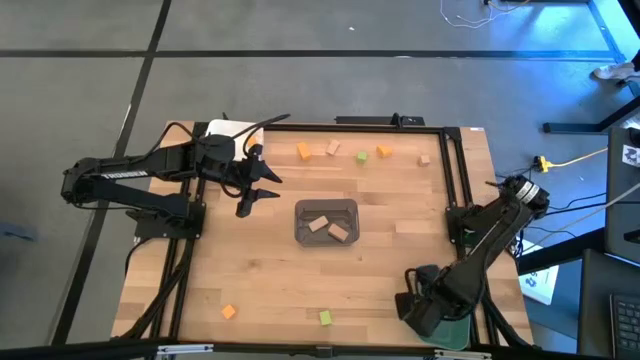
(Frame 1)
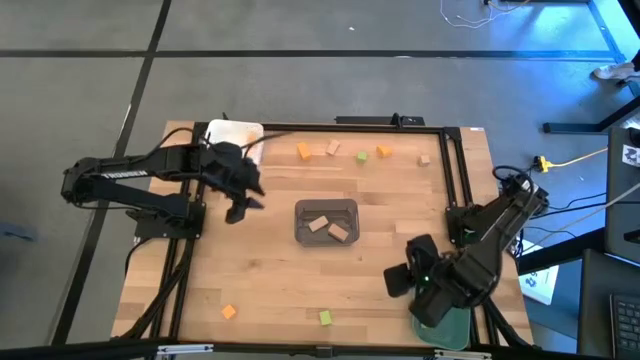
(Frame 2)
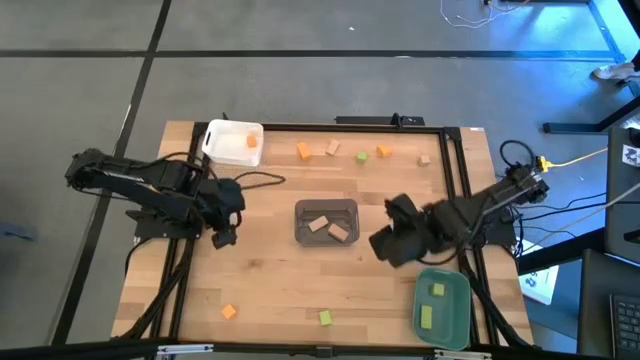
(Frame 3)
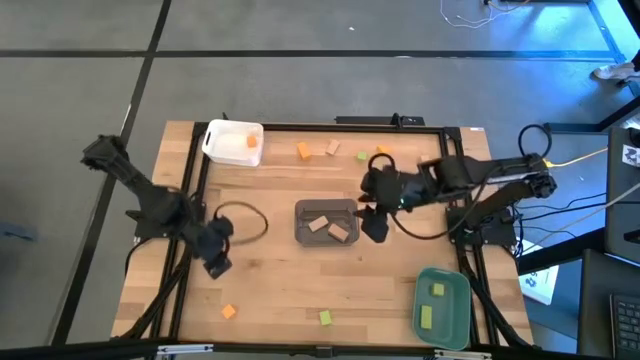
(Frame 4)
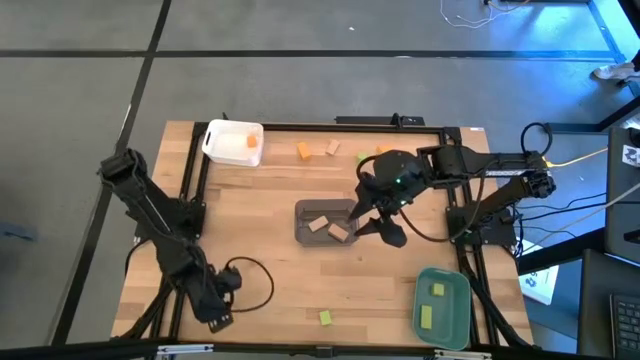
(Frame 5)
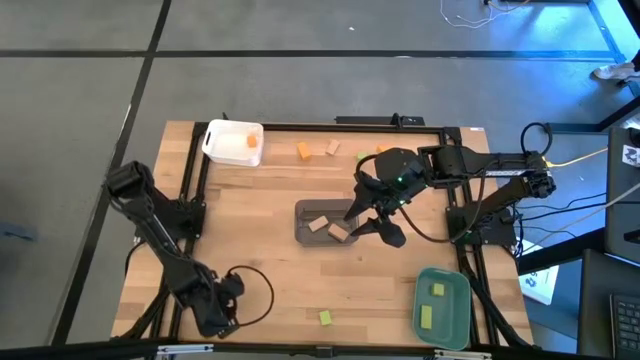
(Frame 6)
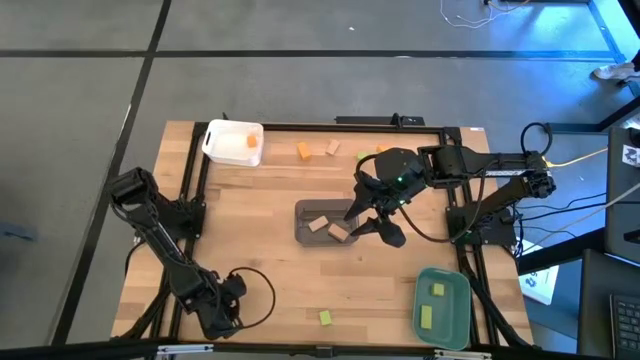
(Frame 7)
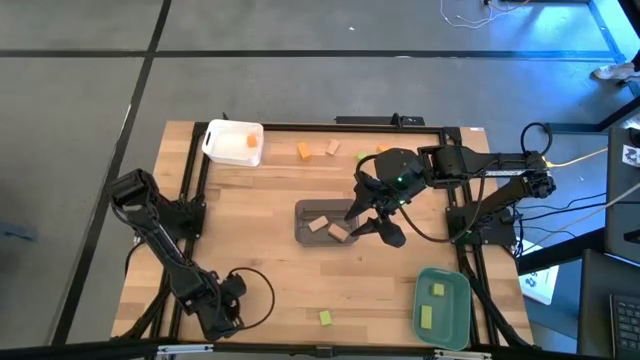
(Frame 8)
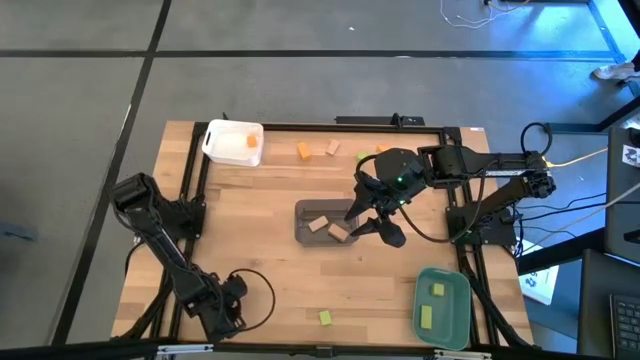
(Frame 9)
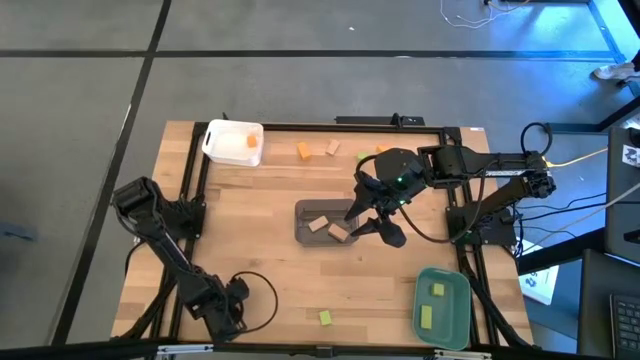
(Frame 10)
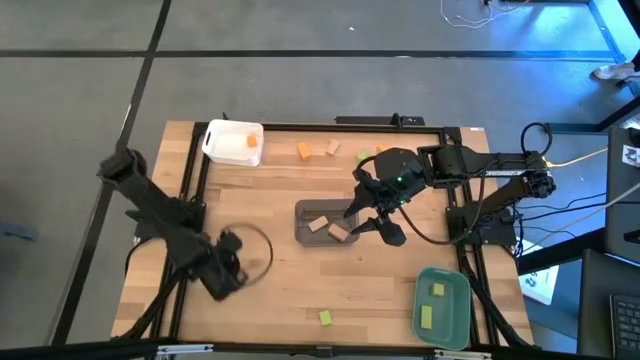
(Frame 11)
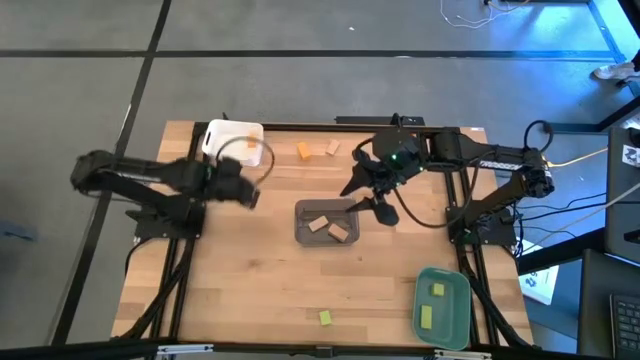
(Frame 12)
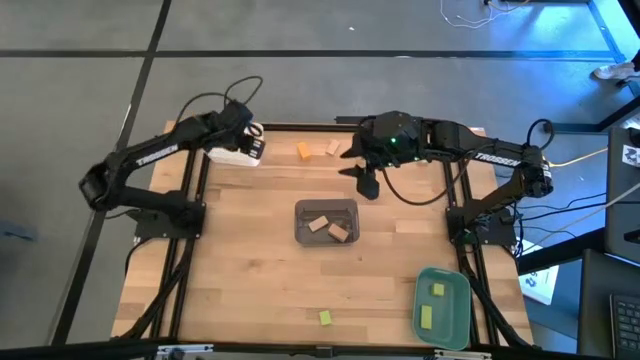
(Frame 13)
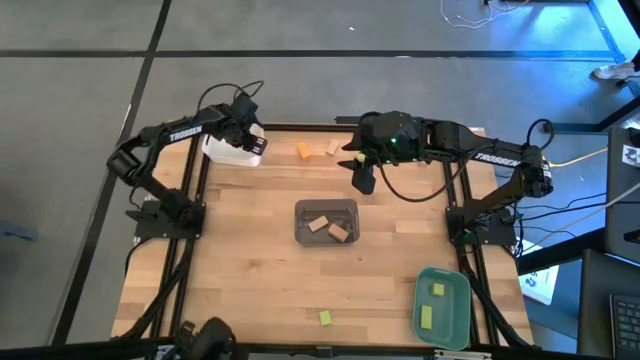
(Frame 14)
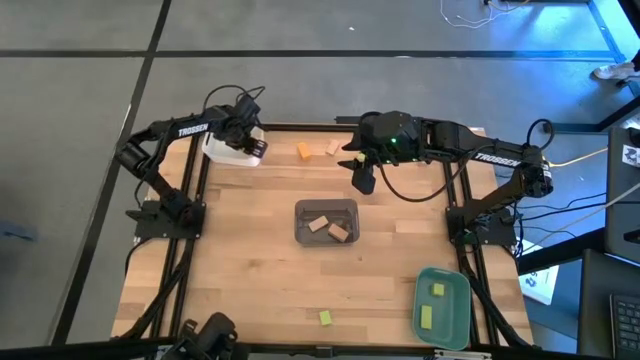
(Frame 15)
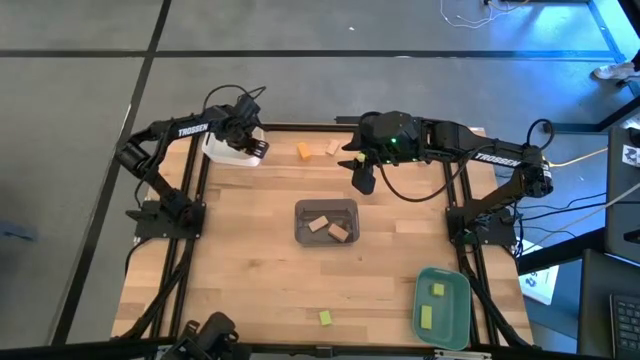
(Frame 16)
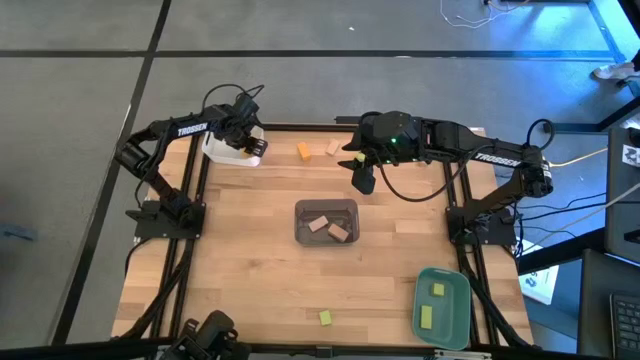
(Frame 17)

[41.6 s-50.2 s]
Task: Sort & place blocks by color
Put the yellow block into the white bin

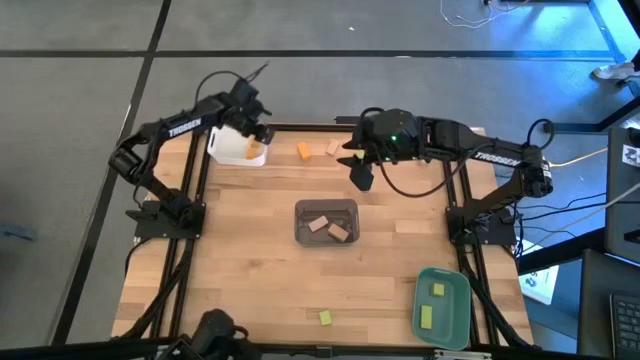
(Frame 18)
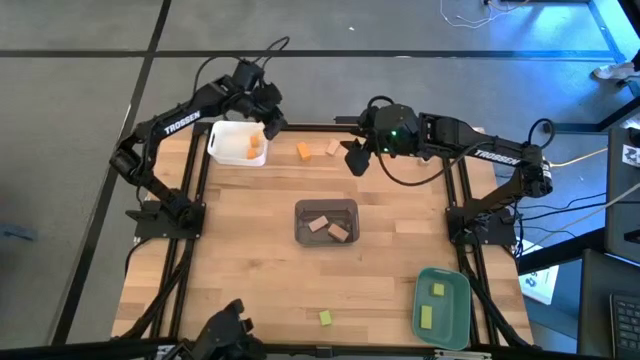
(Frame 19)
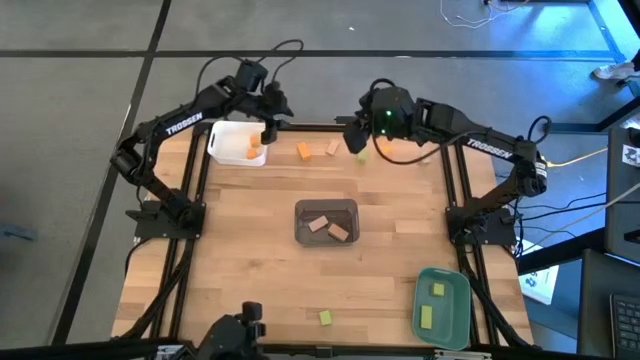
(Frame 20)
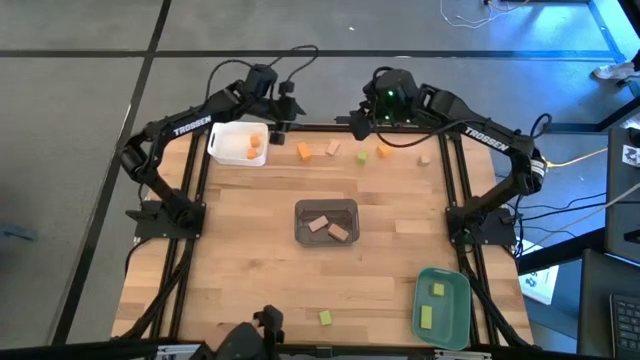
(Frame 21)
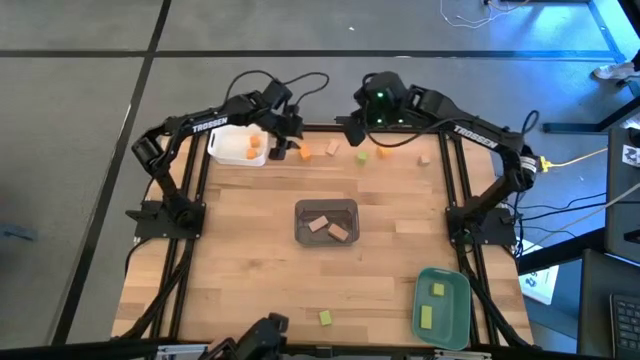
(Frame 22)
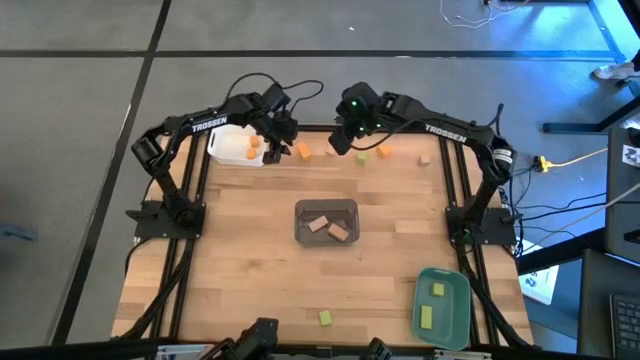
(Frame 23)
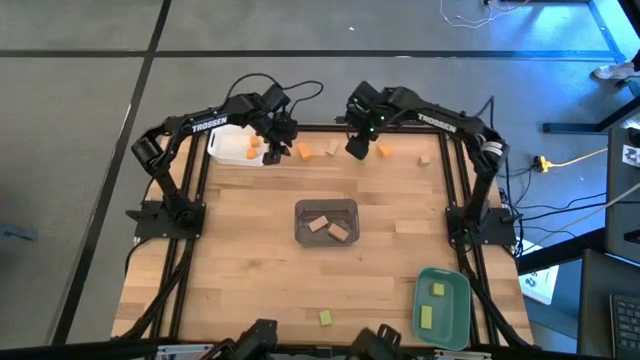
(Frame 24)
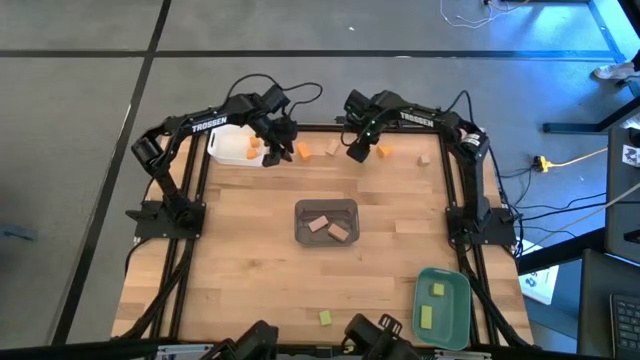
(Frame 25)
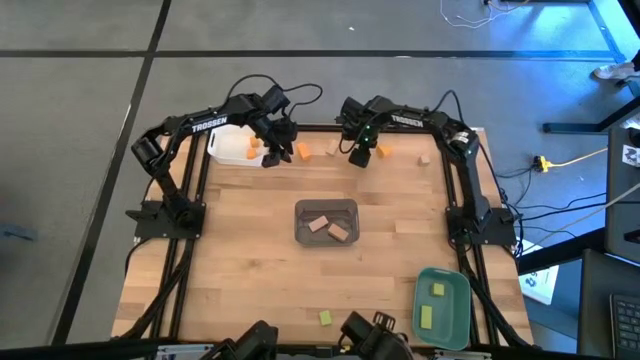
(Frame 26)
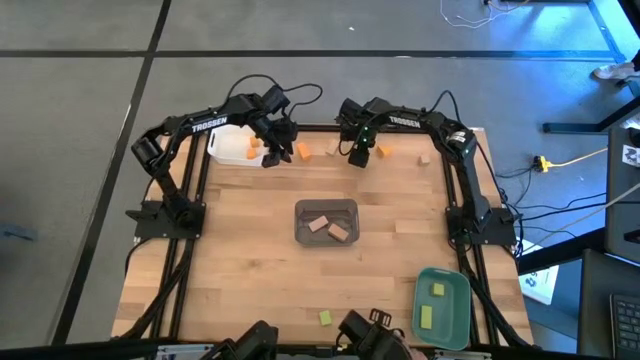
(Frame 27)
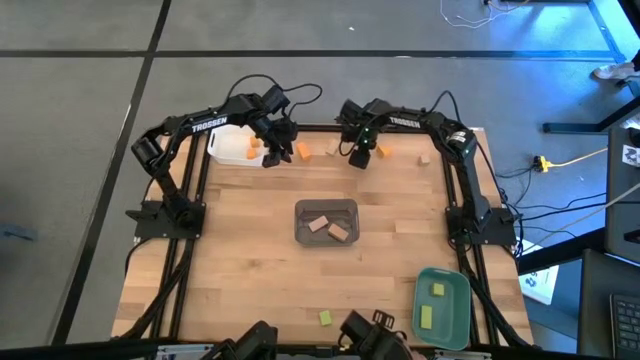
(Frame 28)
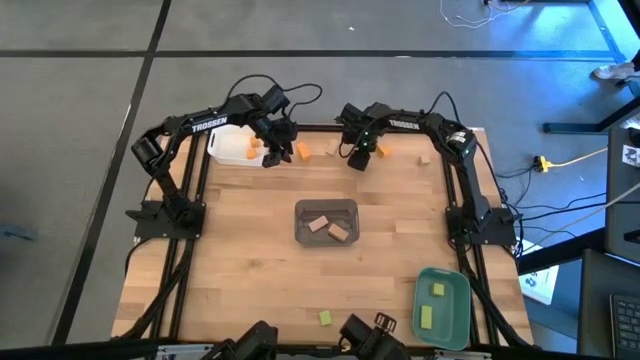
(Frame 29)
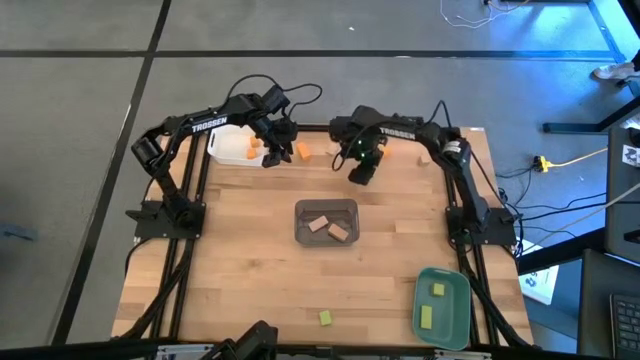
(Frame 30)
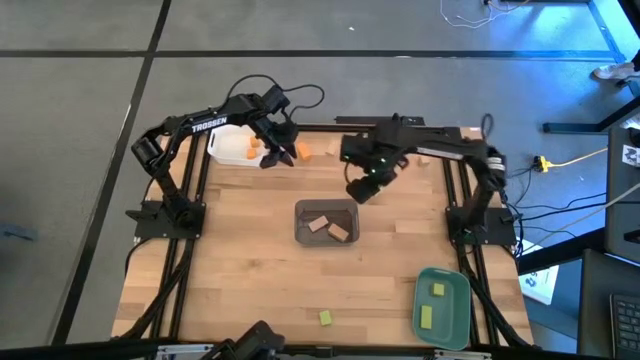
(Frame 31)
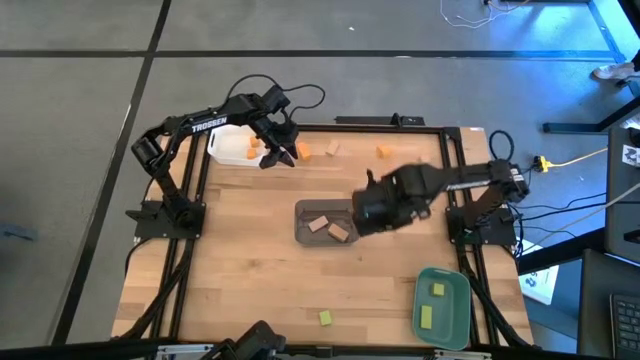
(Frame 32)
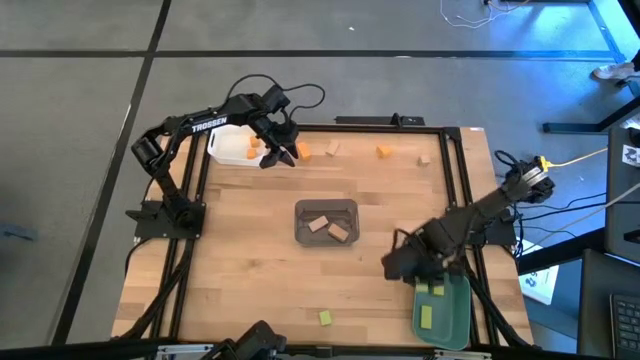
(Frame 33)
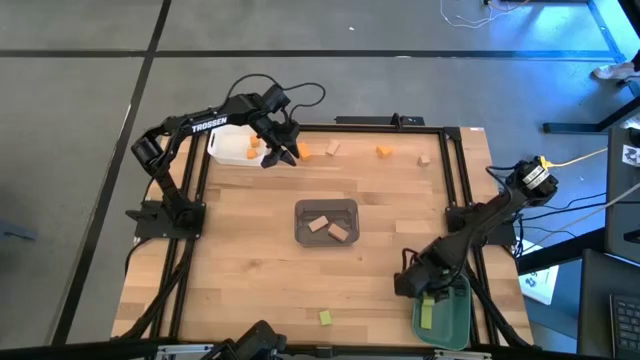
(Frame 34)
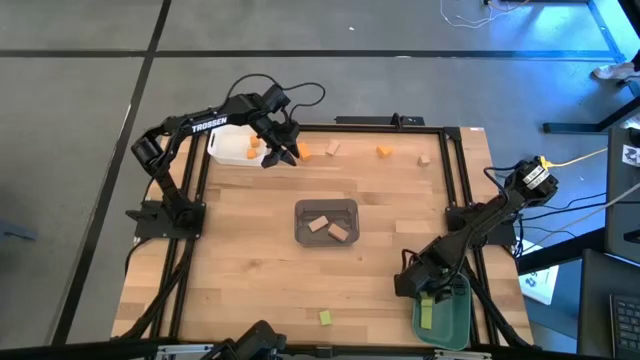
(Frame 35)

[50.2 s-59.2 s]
Put the light green block into the green bin

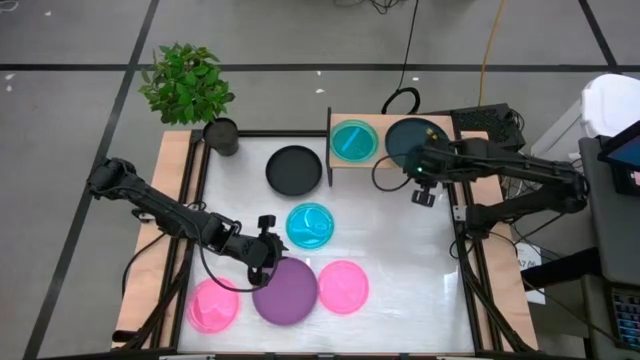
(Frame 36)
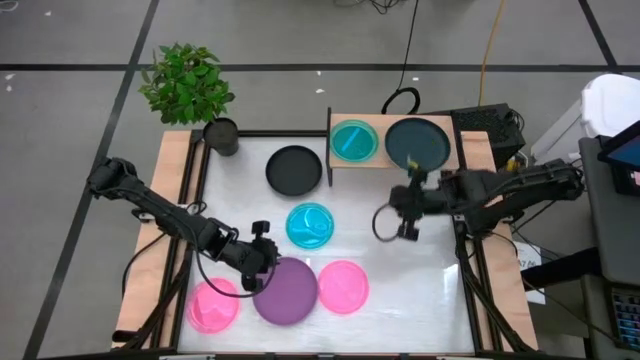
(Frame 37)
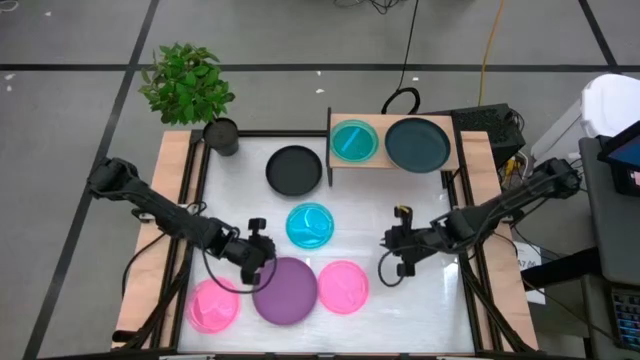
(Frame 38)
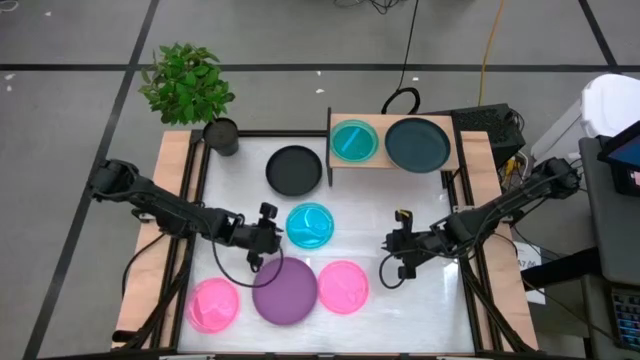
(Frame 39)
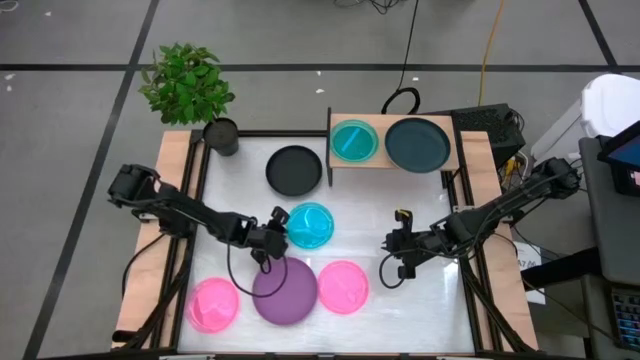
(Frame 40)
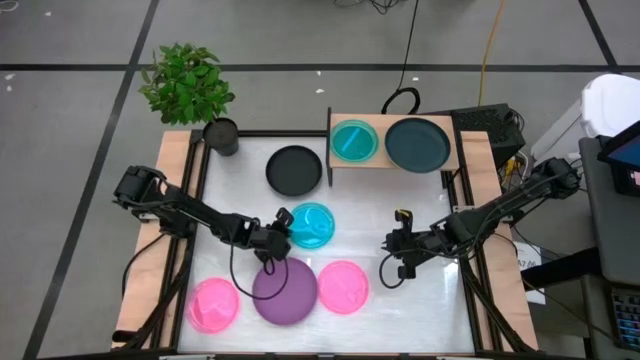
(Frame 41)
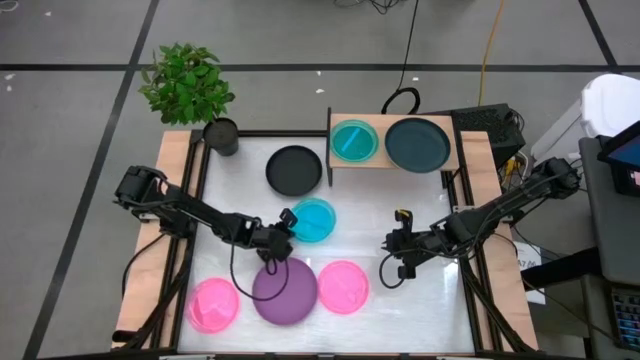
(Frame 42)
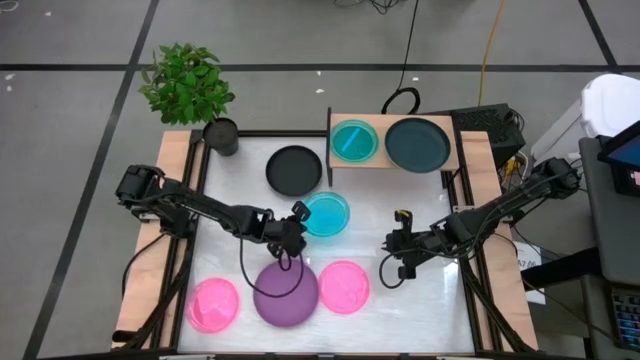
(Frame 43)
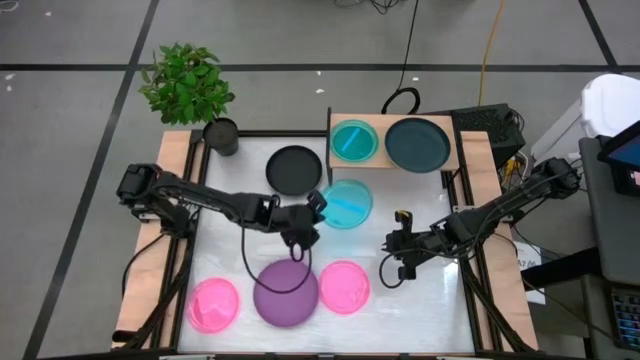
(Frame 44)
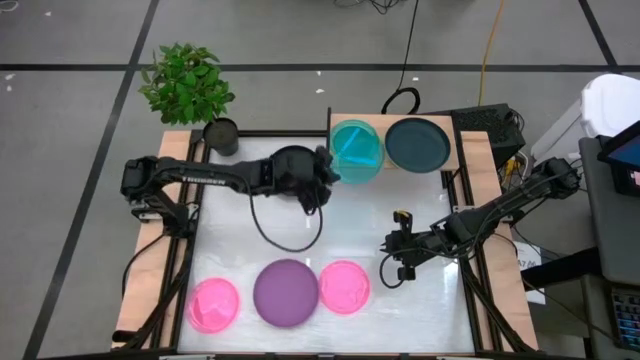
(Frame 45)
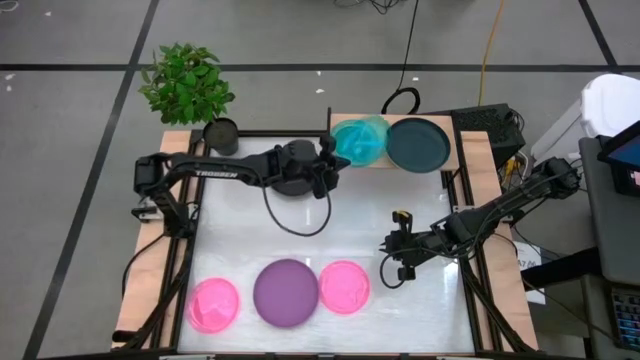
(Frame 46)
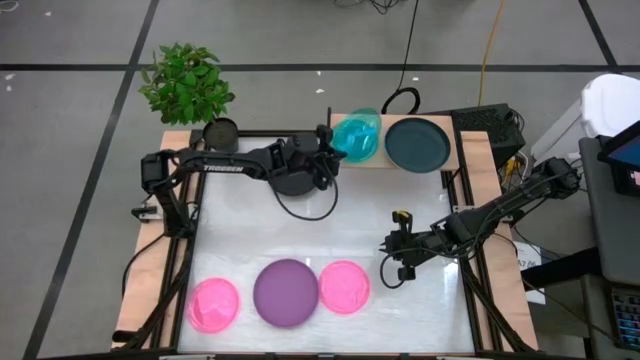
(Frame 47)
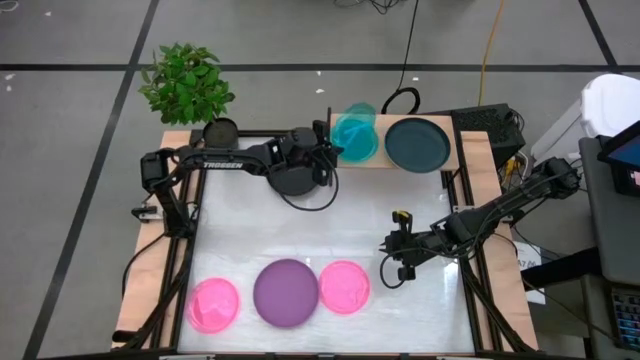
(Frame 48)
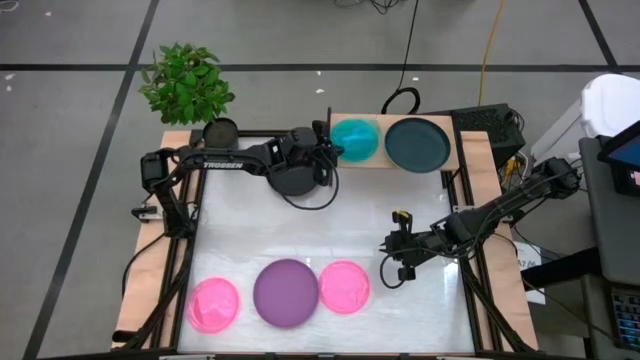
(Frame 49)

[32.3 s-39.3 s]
Task: Place and stack plates onto a shelf
Stack the small blue plate on top of the small blue plate on the shelf
